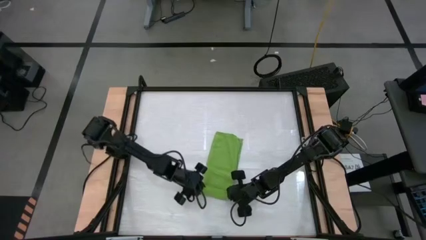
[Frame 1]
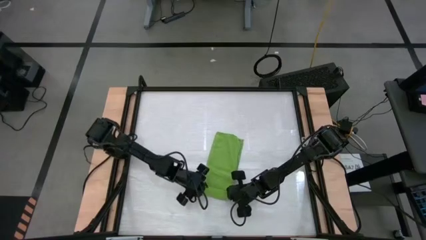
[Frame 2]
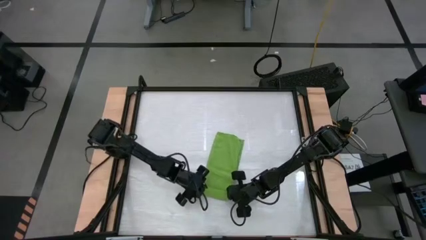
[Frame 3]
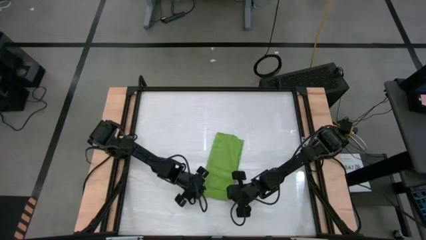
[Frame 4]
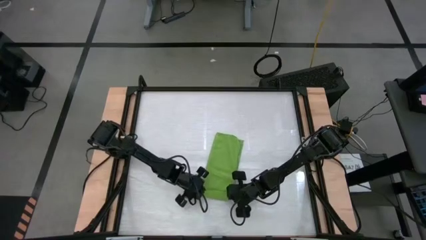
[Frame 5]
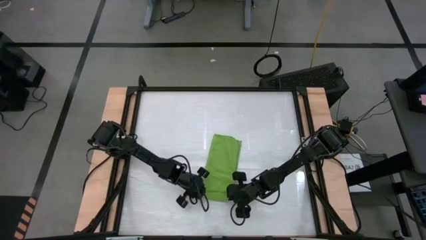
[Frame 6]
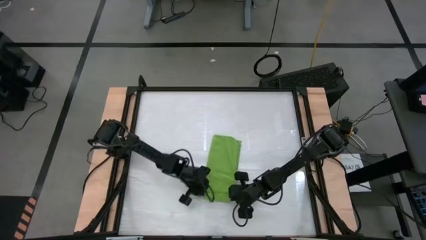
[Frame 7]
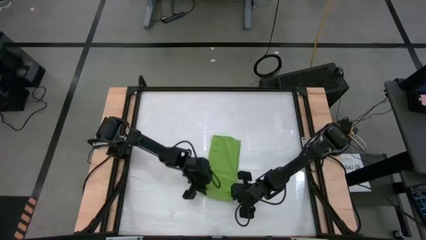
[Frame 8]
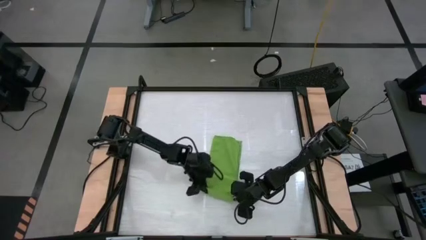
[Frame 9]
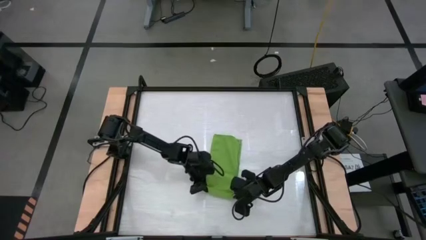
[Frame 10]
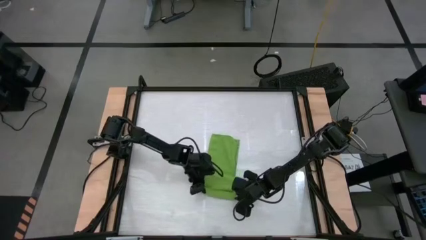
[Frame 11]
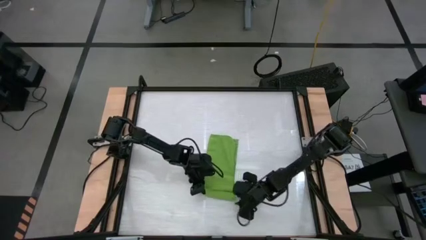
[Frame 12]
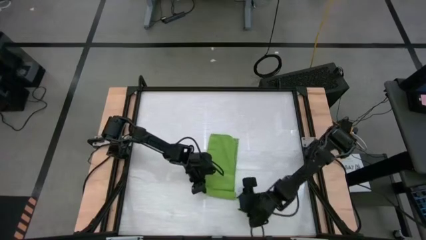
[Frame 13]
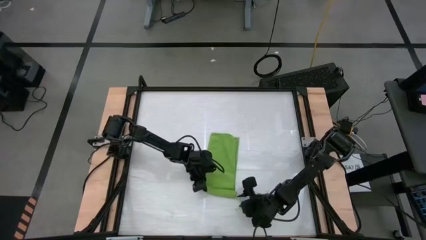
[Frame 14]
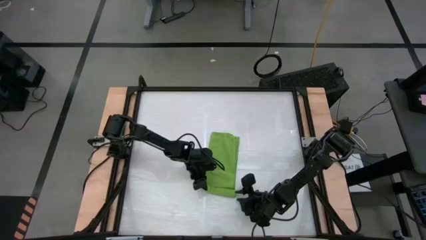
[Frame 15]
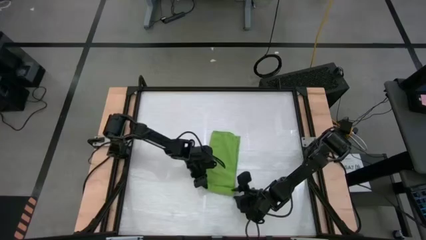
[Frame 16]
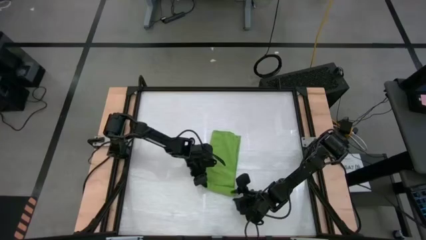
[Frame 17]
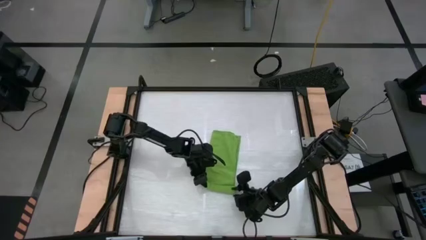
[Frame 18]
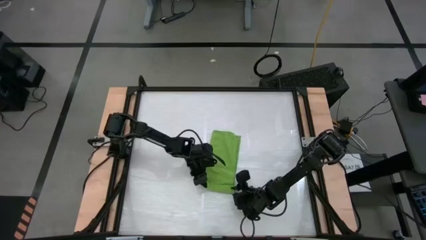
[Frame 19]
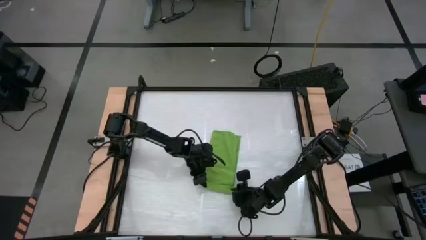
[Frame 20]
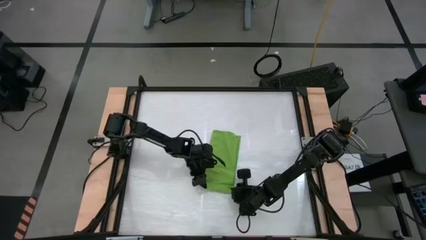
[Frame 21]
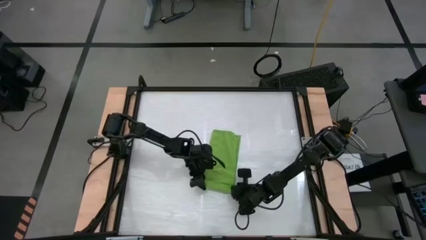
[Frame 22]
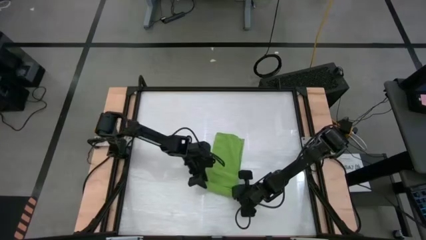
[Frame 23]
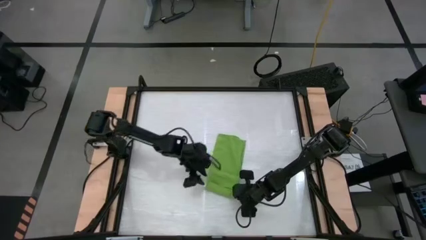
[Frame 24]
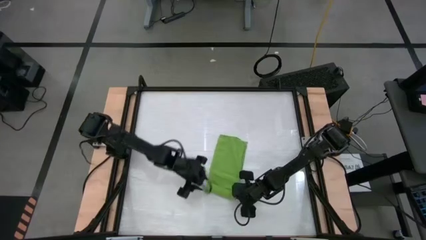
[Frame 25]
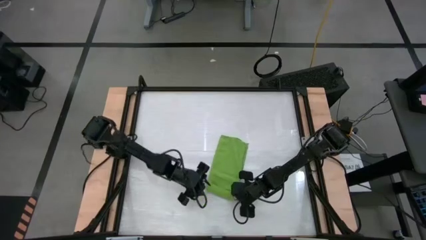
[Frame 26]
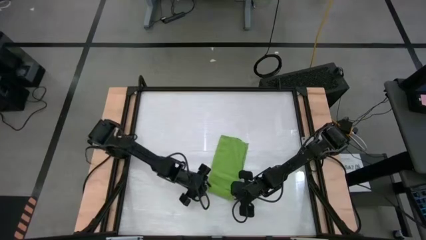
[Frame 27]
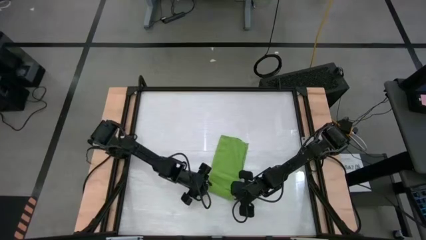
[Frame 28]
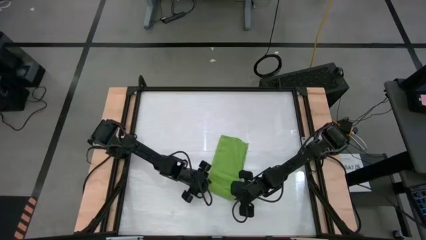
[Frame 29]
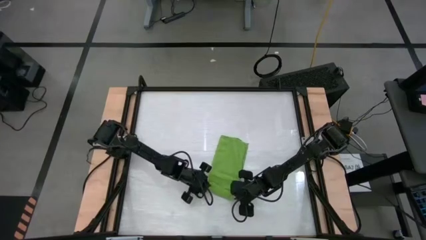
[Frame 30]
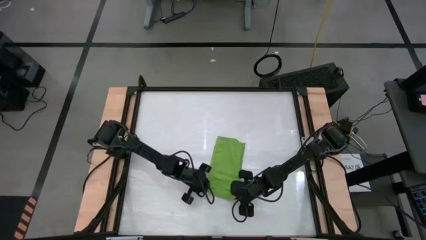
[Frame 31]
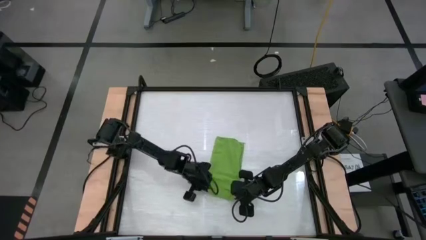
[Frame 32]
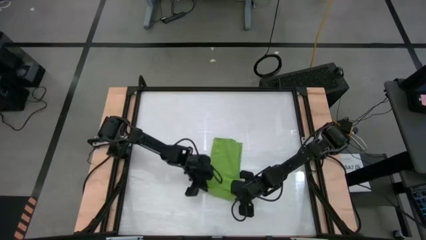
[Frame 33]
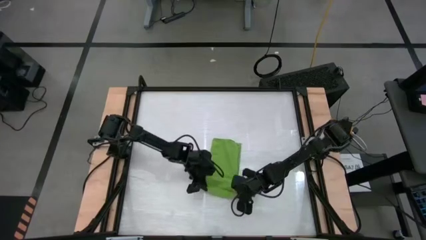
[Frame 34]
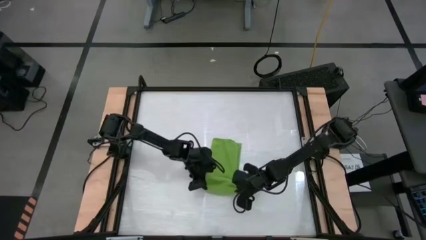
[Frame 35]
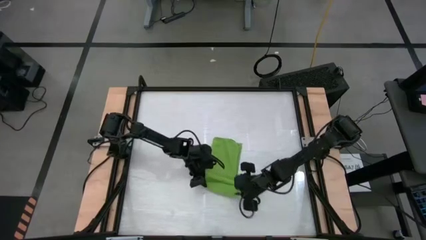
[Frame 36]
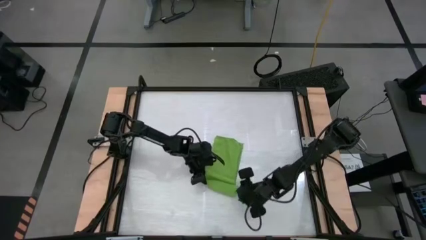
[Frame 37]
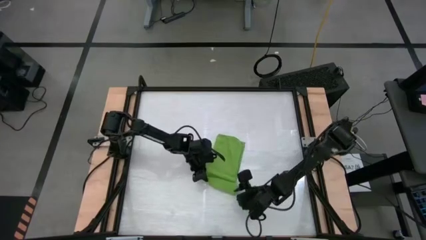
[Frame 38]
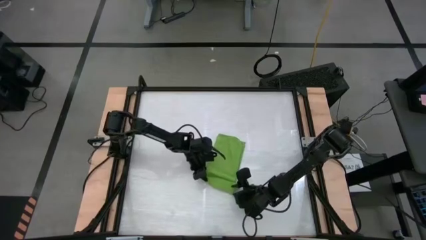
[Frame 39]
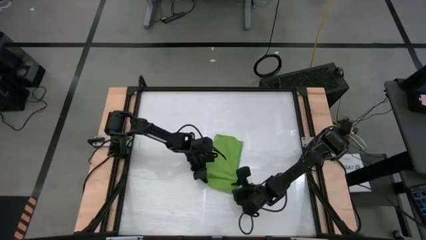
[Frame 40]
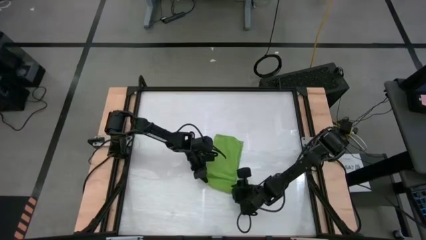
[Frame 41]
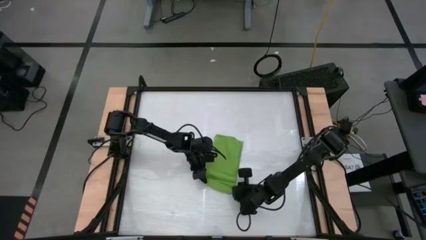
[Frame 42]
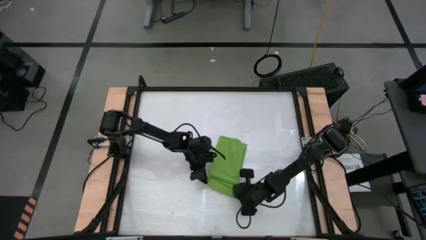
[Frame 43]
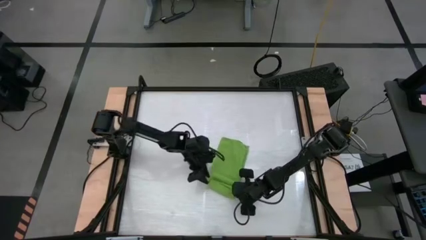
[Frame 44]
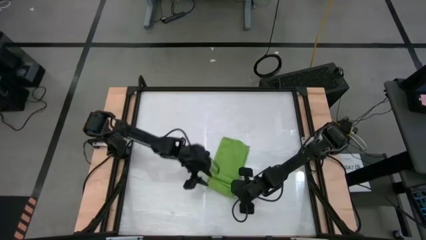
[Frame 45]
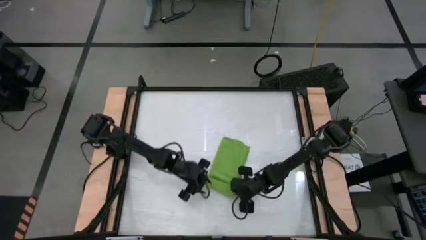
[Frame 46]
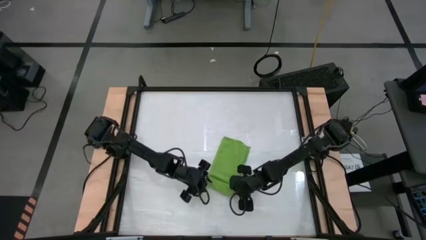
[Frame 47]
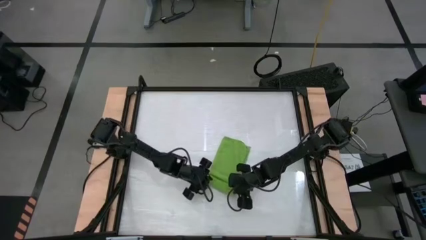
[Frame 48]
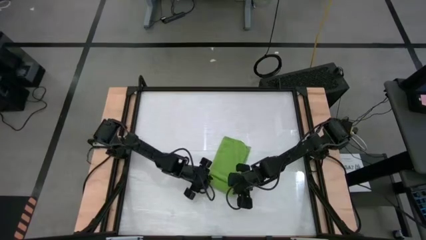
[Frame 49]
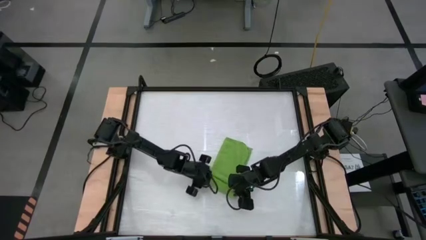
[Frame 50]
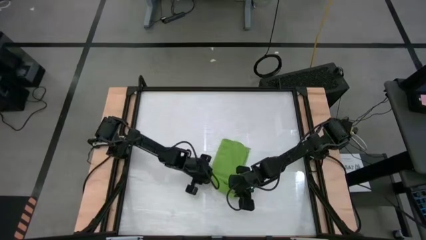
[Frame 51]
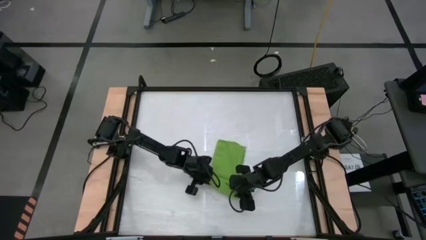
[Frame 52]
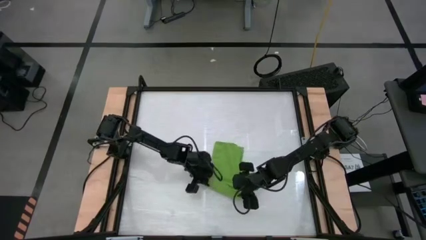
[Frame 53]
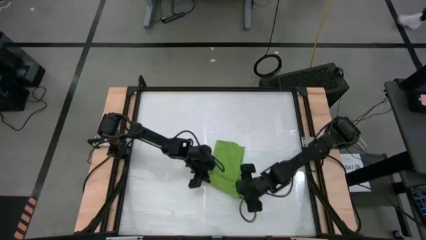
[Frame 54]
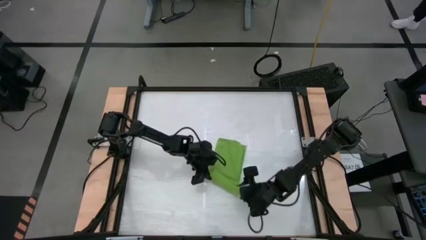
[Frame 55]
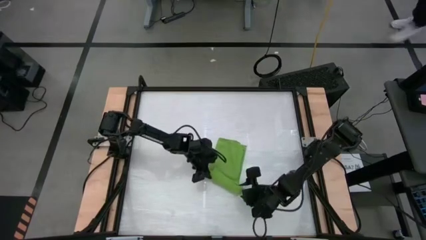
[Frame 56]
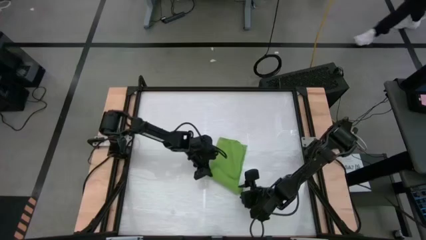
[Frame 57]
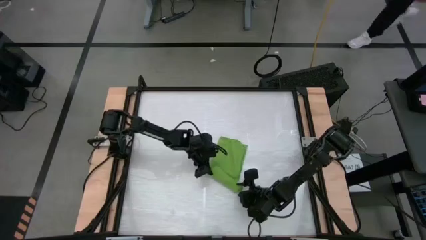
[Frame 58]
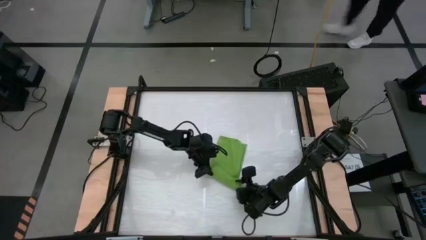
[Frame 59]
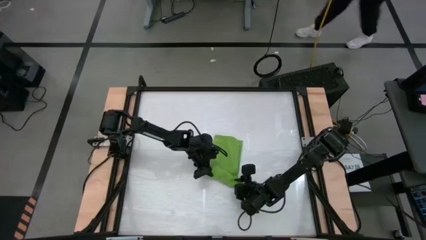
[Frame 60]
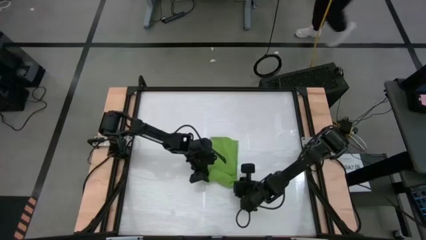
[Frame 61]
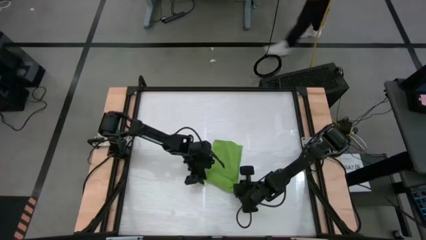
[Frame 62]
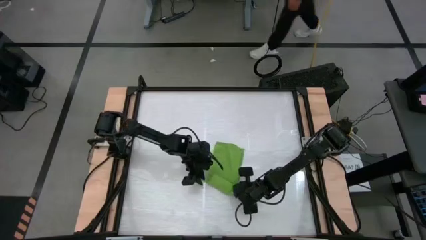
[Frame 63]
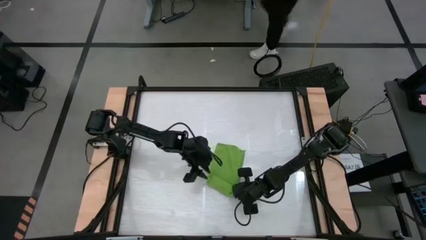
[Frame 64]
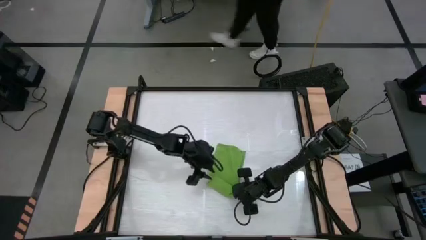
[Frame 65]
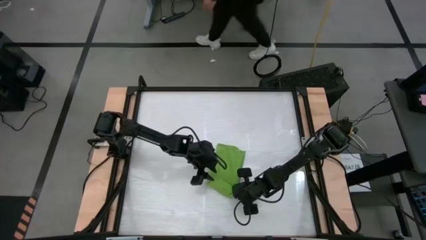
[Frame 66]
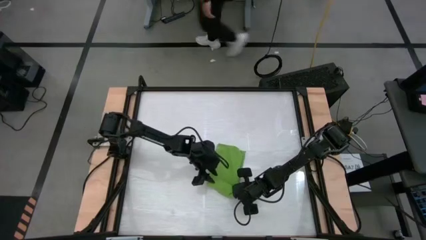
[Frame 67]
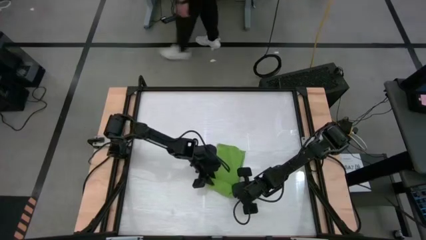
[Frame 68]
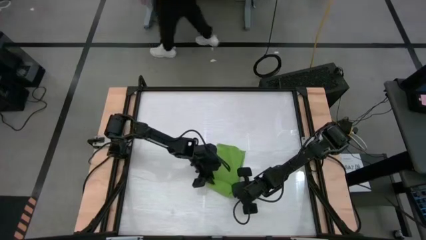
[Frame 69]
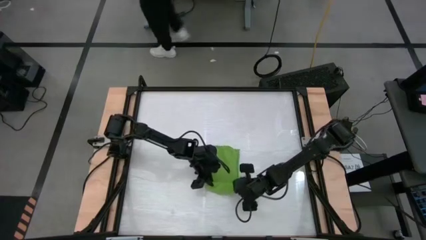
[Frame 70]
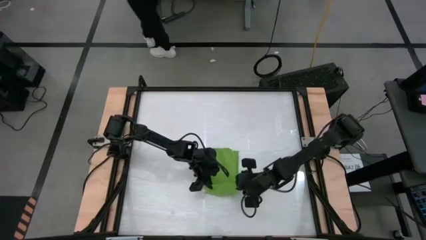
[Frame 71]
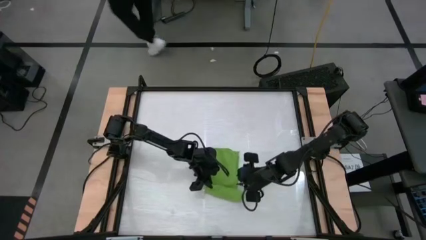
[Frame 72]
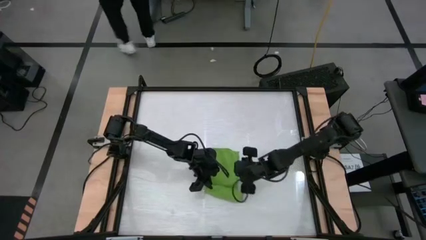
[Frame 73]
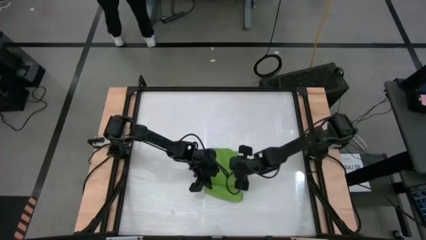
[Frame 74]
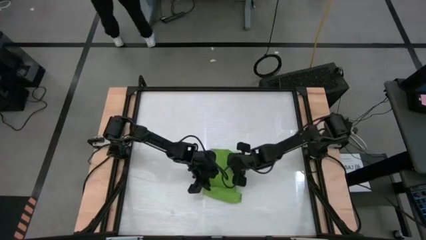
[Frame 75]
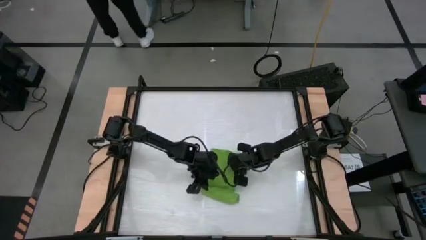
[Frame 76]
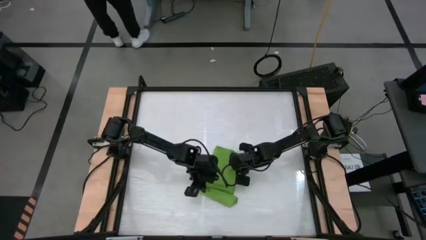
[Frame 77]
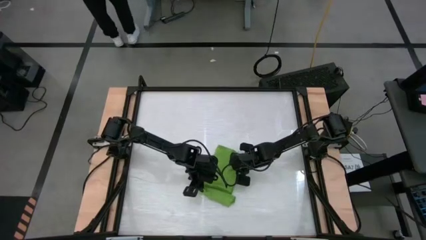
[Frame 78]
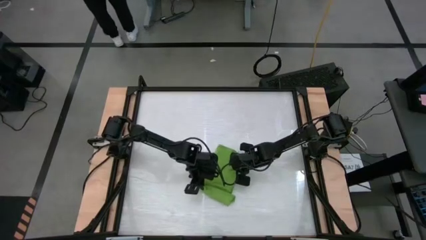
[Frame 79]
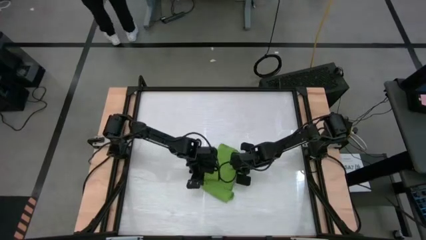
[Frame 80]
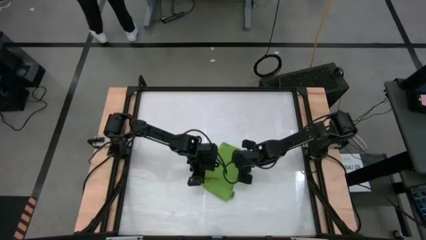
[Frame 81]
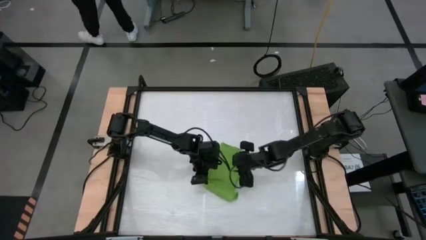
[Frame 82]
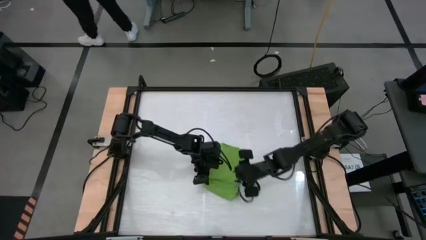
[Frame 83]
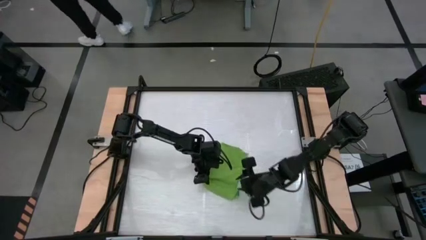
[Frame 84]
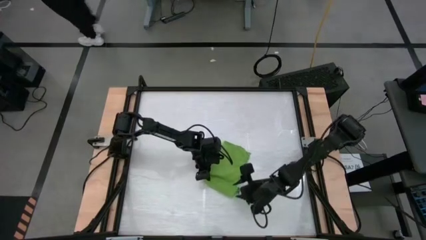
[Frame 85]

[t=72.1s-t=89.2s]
Task: Roll towel into tight, uniform cylinder
Roll the green towel
